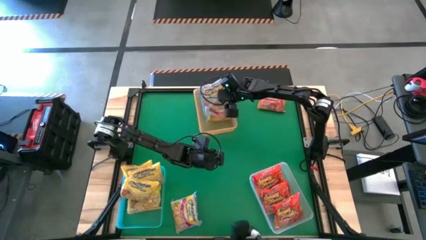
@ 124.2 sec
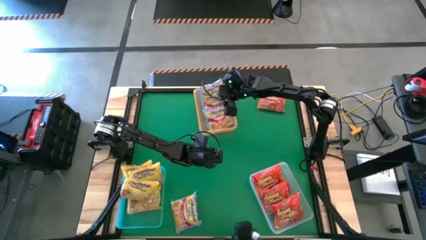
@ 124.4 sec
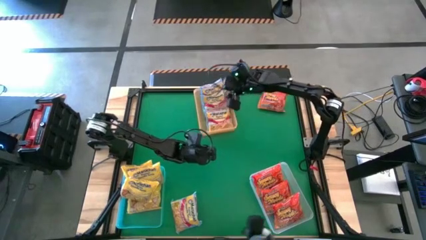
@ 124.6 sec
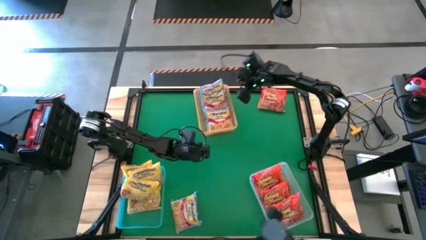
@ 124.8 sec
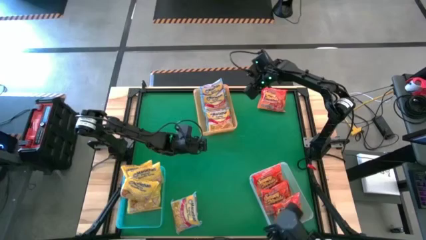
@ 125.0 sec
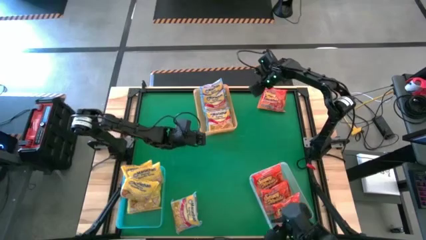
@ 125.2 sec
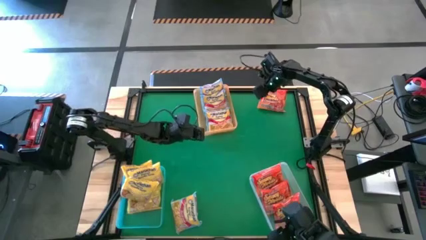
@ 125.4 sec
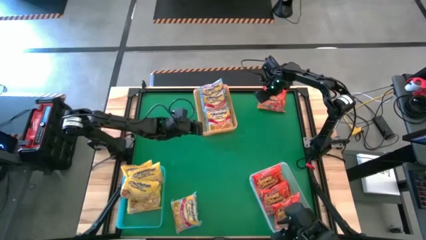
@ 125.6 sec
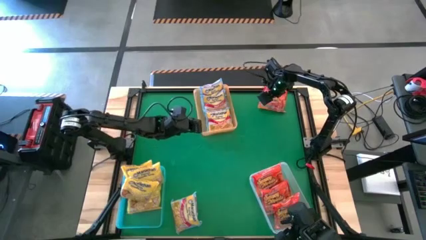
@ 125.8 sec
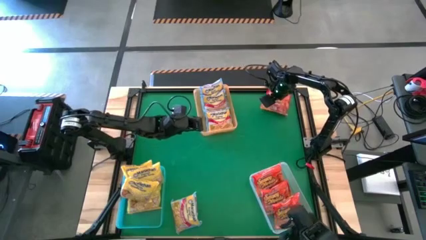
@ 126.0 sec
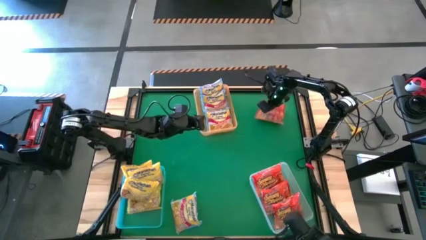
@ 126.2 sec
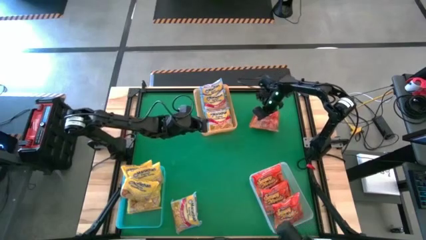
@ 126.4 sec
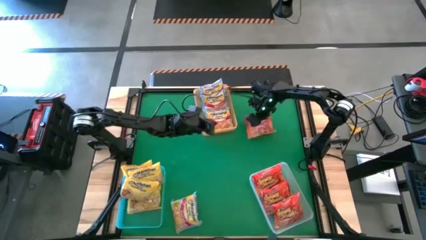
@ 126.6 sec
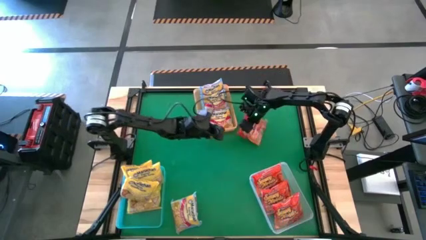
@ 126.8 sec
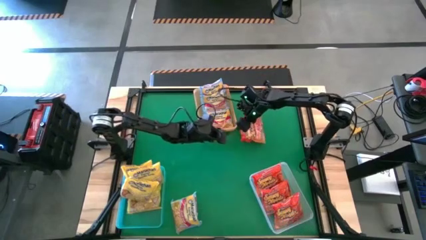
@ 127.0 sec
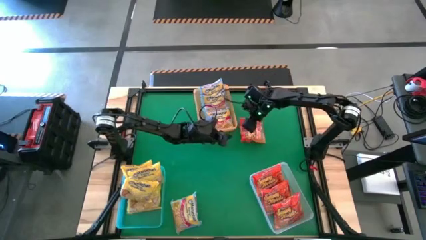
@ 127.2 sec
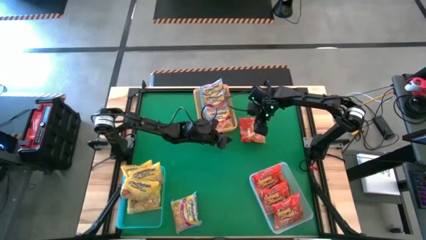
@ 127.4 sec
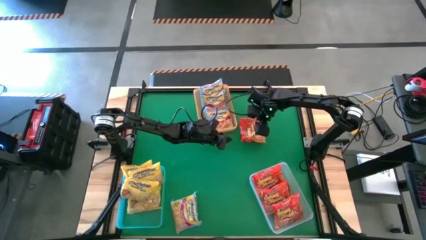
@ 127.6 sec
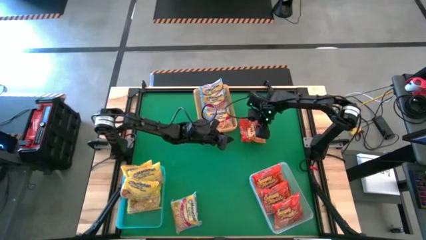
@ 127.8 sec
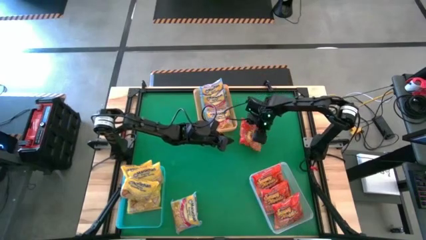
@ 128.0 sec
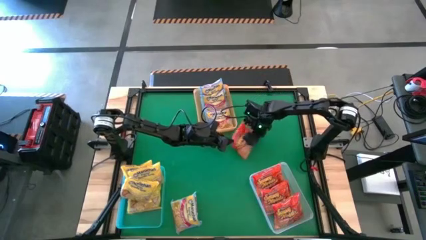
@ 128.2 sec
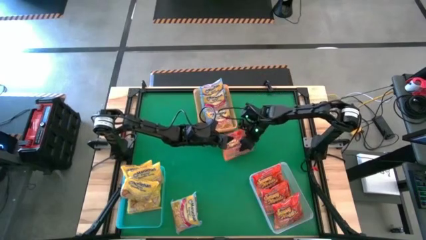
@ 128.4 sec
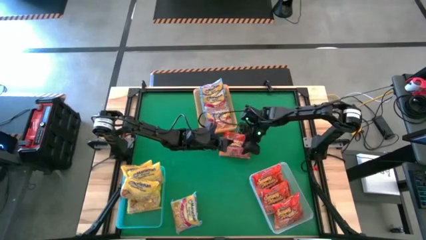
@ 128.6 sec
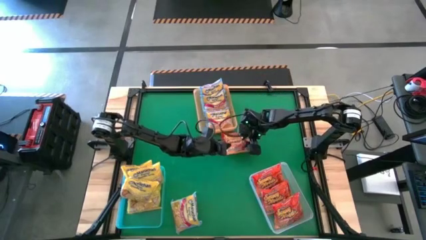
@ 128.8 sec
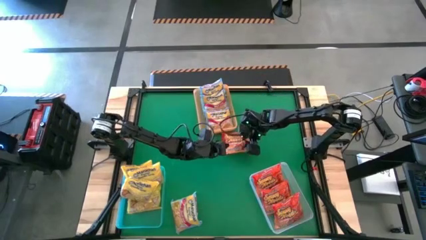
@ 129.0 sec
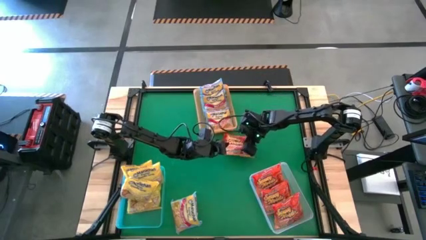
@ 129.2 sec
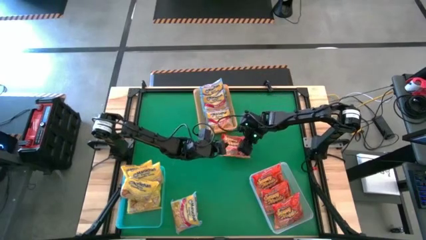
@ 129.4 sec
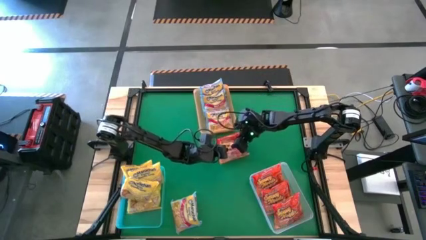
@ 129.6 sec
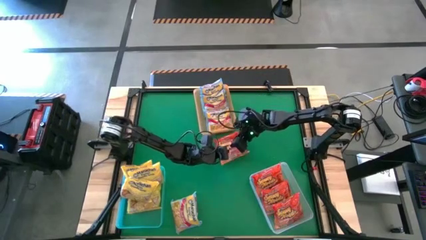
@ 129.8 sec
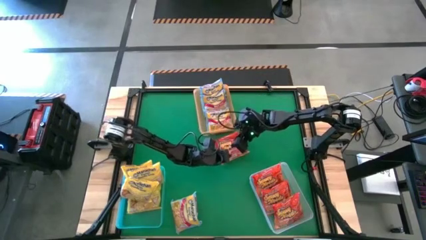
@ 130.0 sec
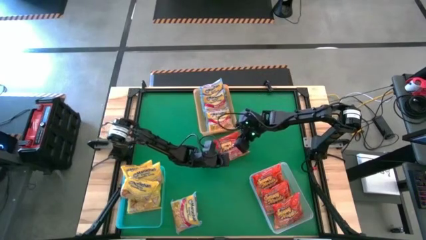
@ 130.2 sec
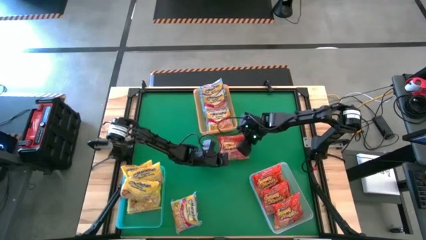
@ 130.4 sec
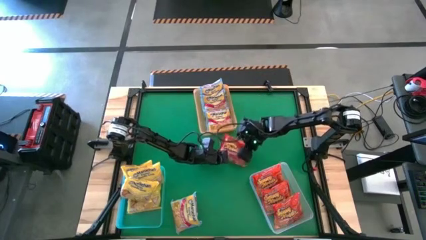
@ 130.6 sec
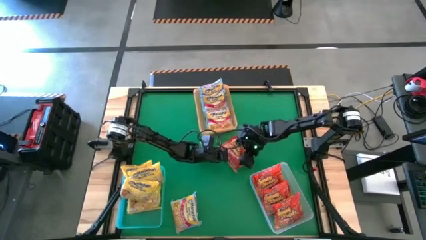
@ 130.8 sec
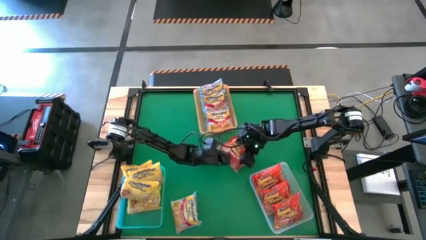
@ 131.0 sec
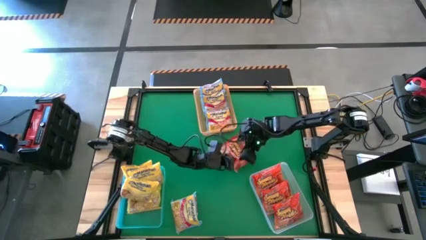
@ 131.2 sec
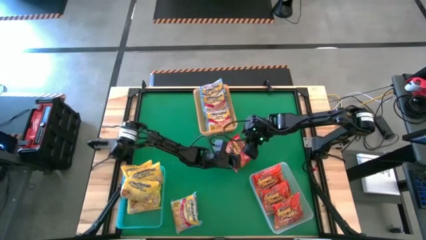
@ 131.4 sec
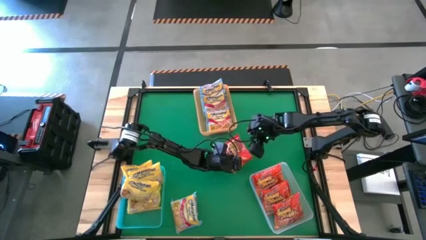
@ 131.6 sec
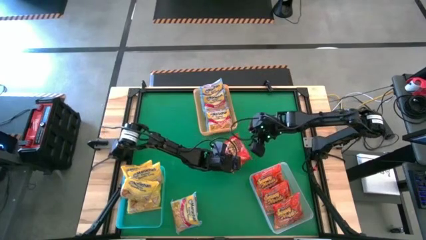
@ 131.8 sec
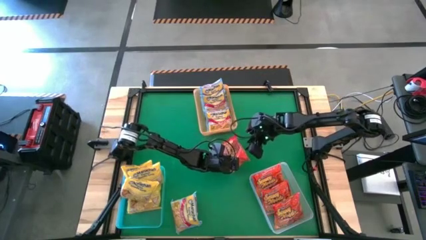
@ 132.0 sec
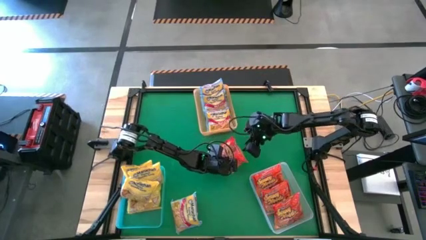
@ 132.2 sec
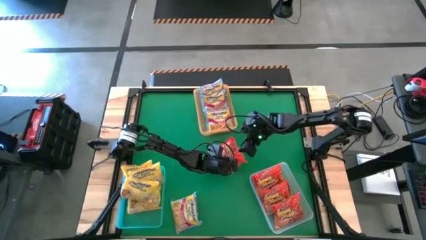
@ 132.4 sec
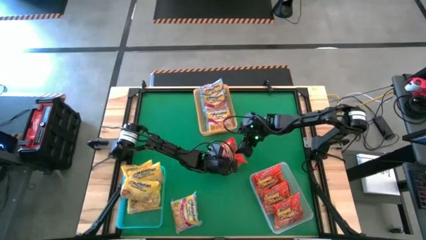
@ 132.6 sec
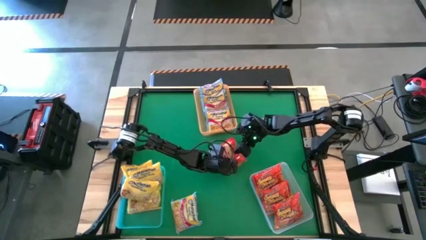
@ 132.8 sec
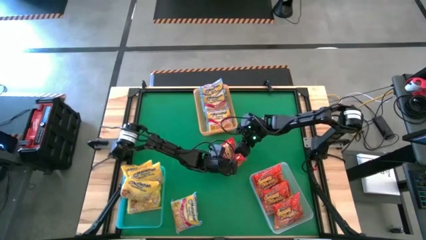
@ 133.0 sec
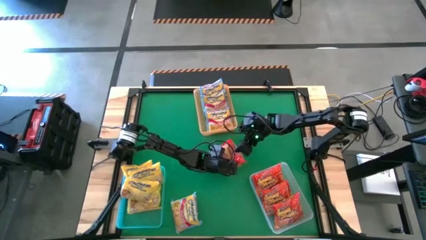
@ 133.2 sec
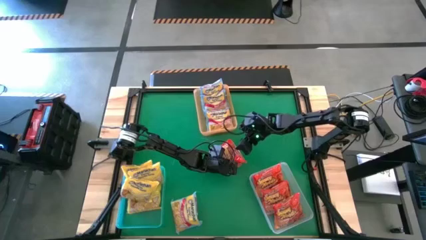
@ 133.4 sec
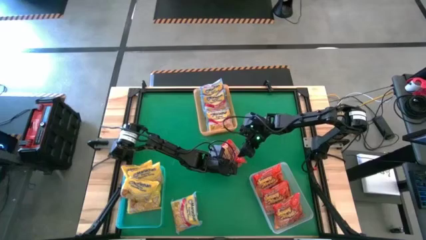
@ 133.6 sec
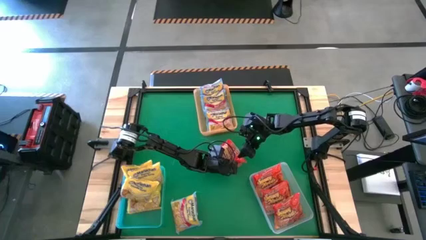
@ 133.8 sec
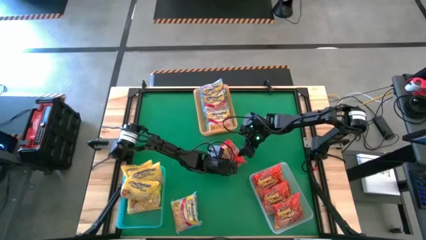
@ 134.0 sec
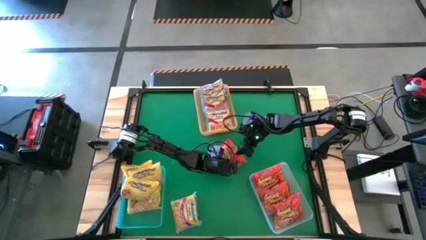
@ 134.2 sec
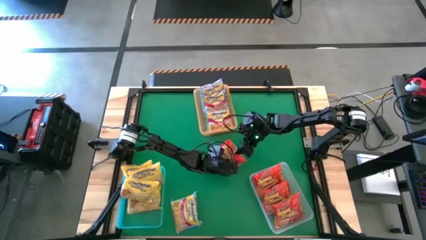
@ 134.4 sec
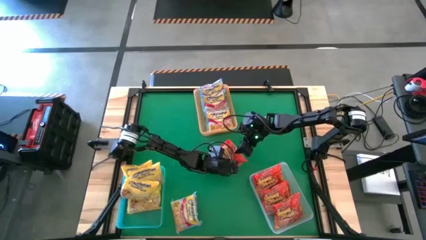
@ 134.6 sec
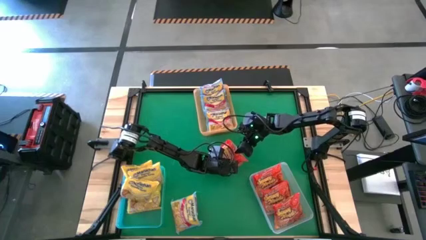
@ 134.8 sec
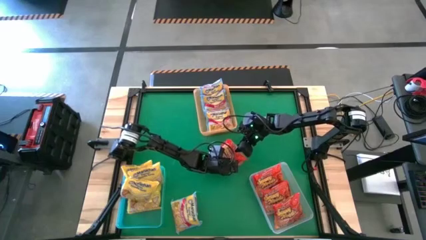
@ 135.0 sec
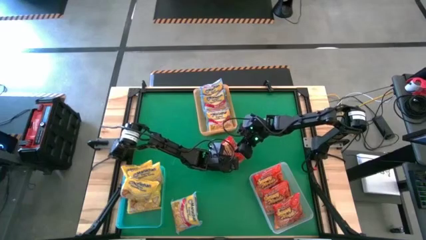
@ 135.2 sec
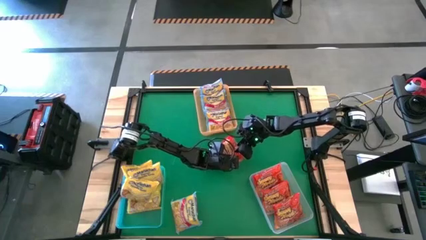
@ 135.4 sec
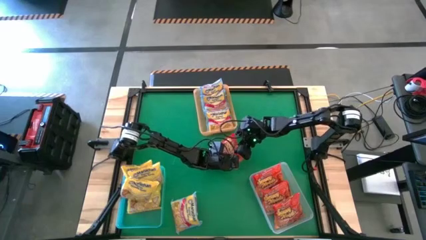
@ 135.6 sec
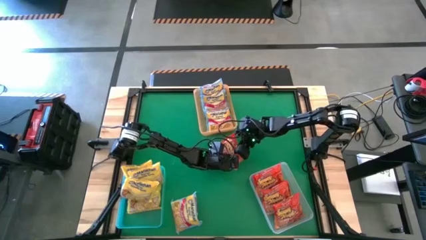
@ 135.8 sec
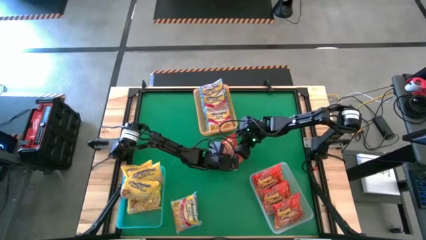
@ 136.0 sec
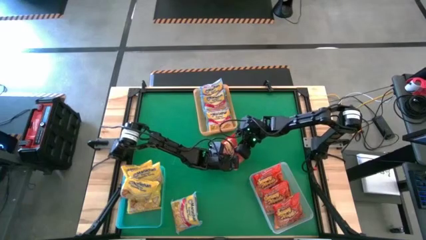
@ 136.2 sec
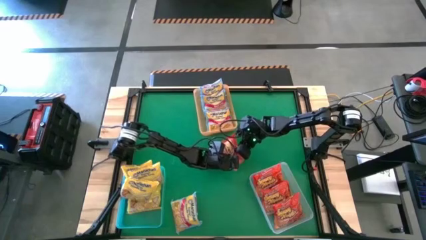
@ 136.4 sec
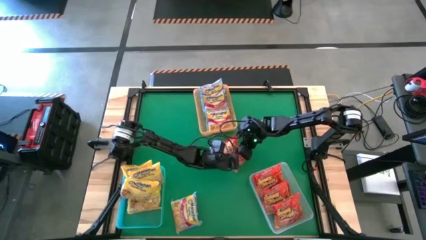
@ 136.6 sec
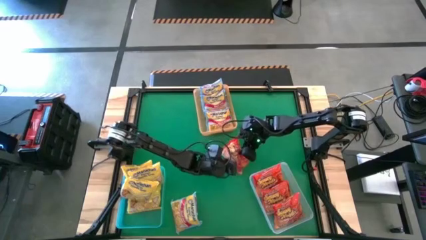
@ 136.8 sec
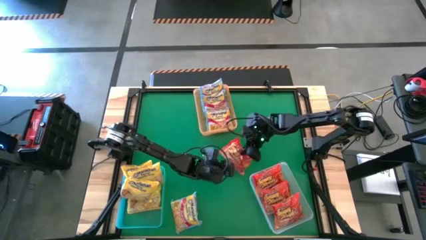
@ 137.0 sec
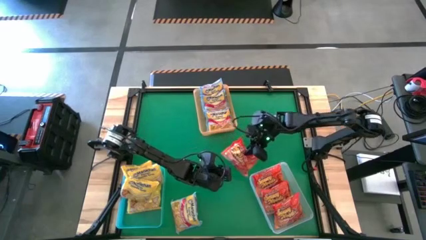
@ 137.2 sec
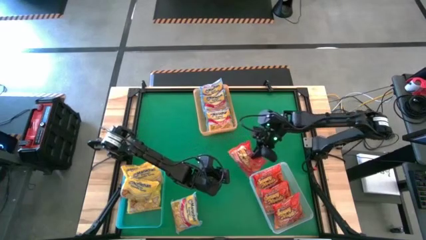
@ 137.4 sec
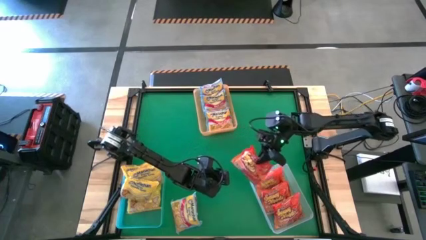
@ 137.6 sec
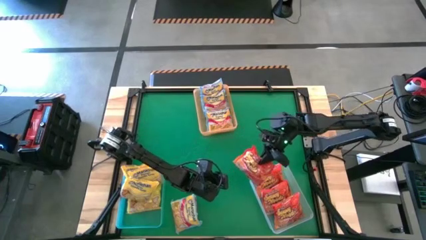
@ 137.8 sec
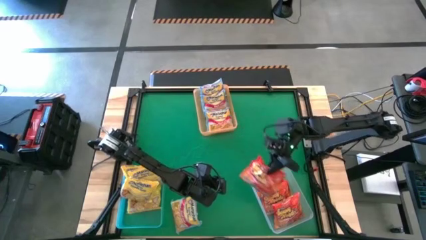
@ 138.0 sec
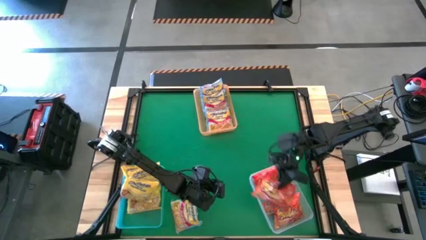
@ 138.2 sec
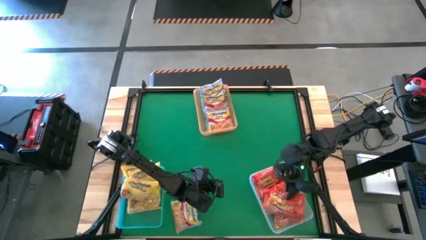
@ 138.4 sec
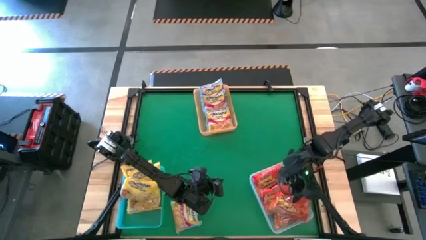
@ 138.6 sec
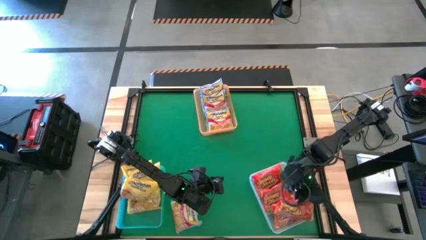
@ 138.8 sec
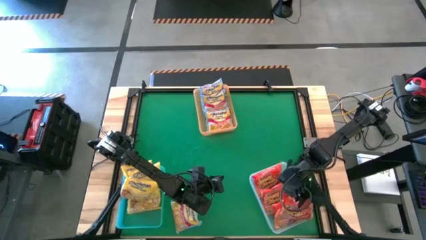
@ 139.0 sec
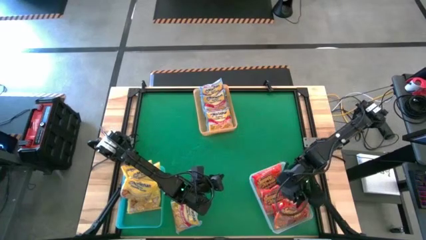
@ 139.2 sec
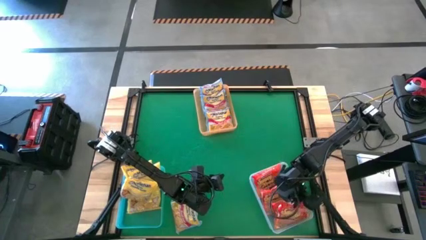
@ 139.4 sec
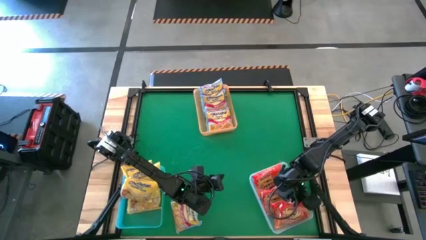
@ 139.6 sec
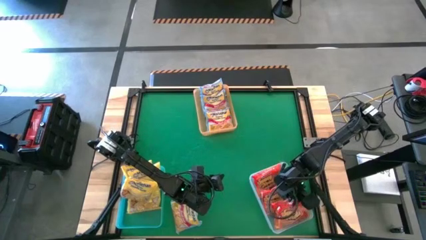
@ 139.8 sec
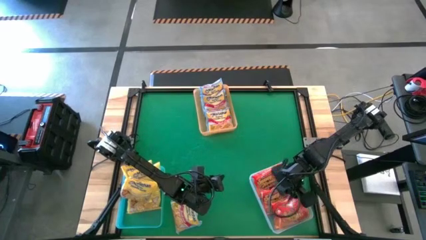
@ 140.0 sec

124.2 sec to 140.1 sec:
Task: Sort Maruchan noodles
Put the orange noodle pack into the transparent bin
